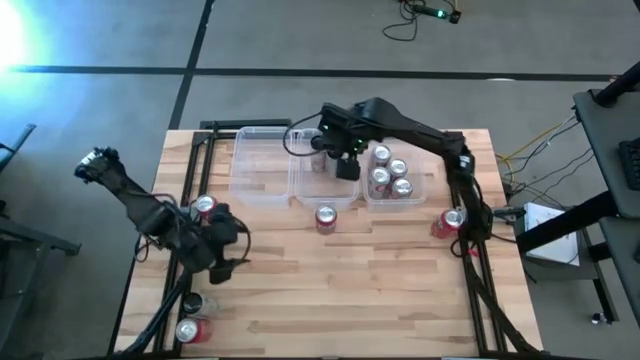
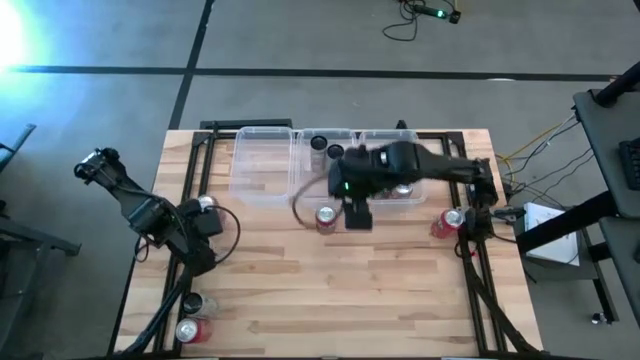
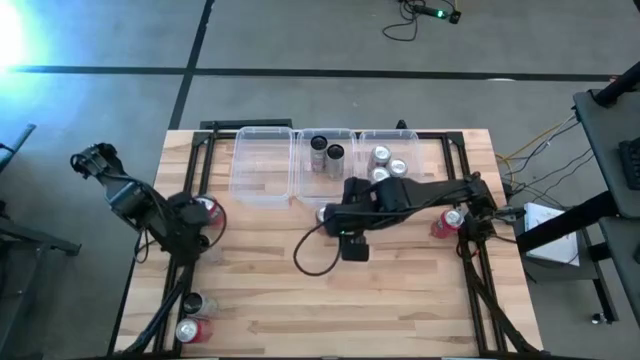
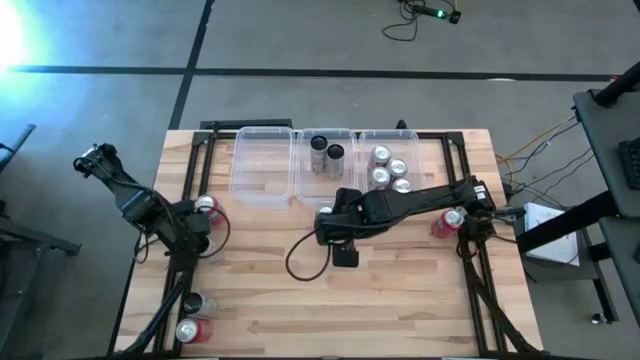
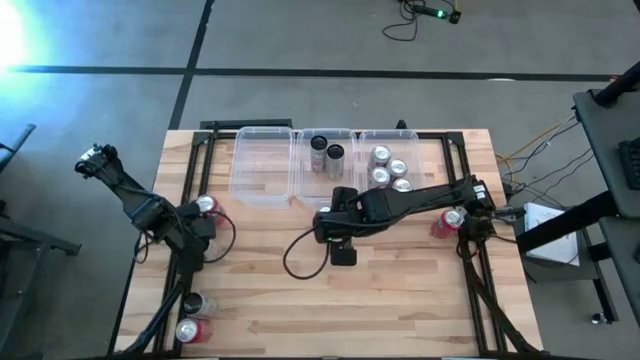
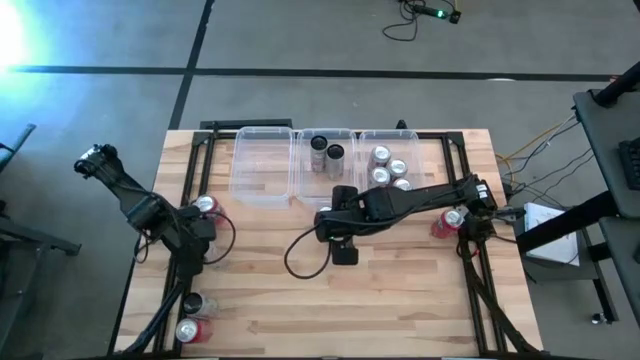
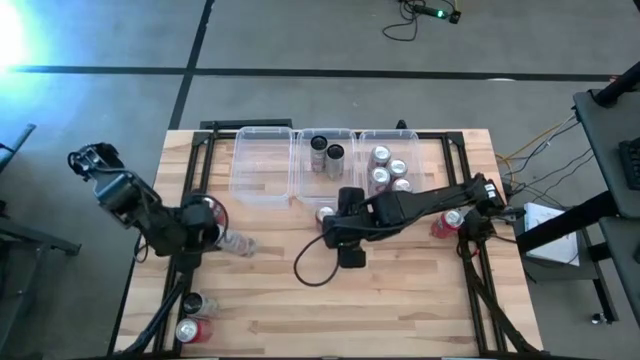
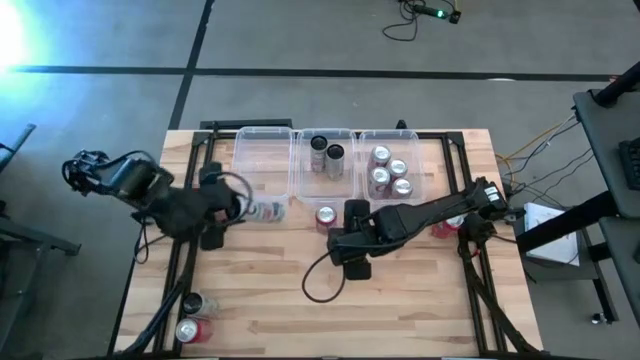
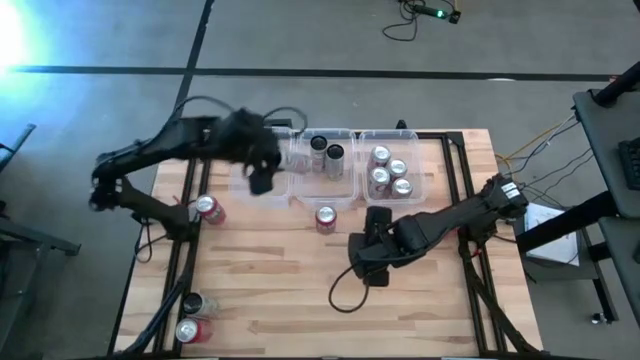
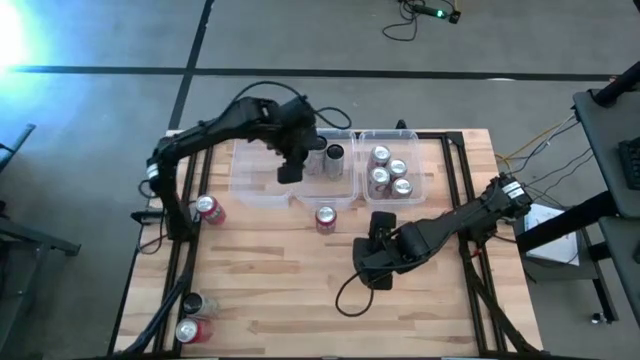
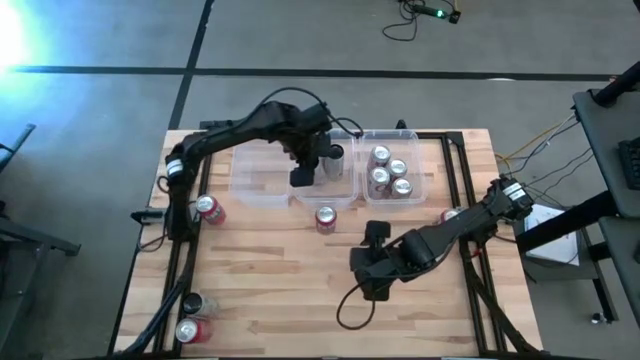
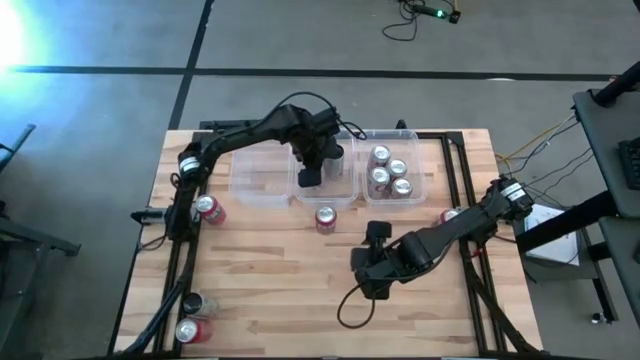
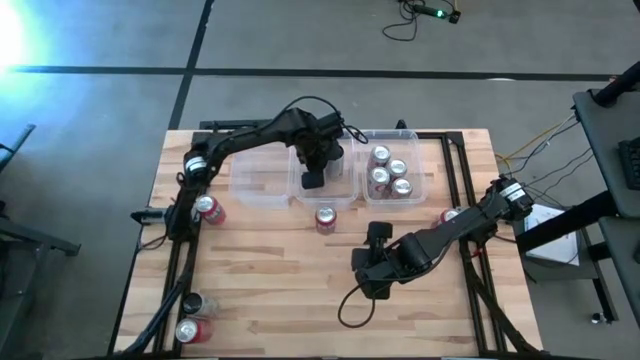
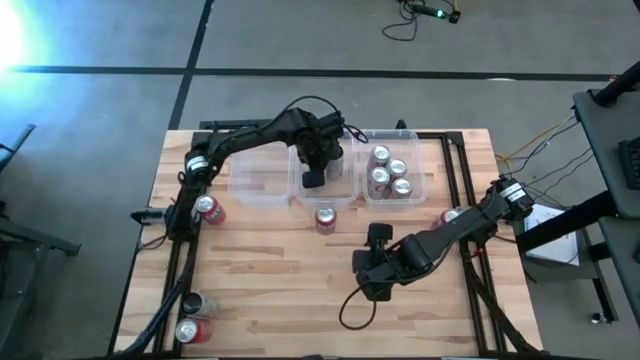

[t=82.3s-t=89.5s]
Task: Sort soda cans
Put the top white pink soda can into the middle transparent bin

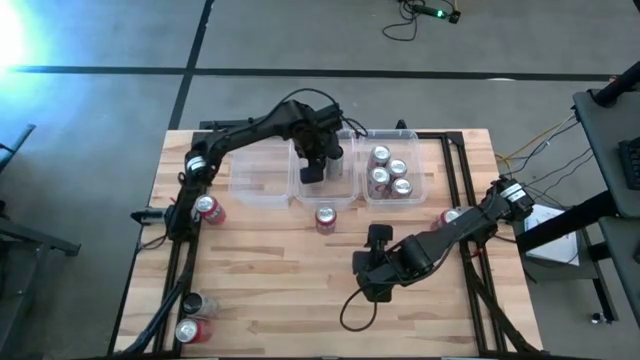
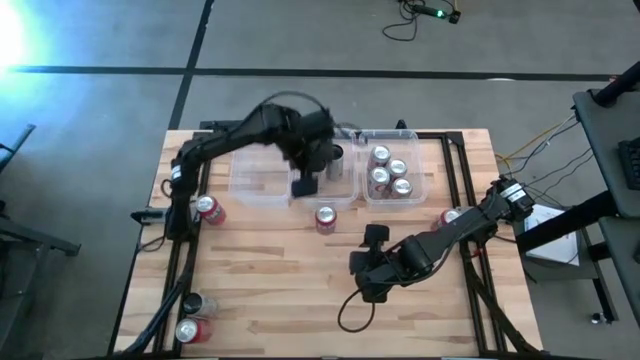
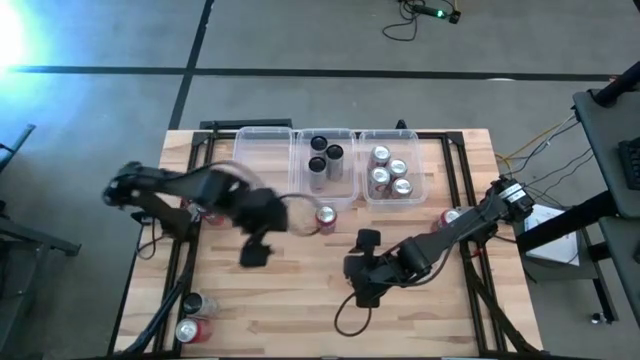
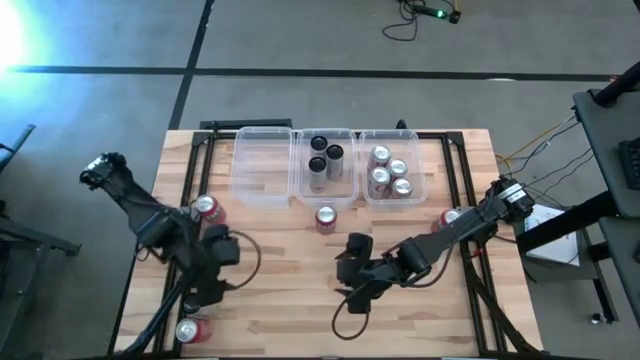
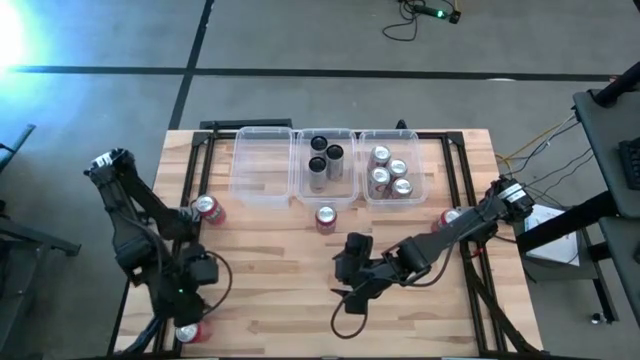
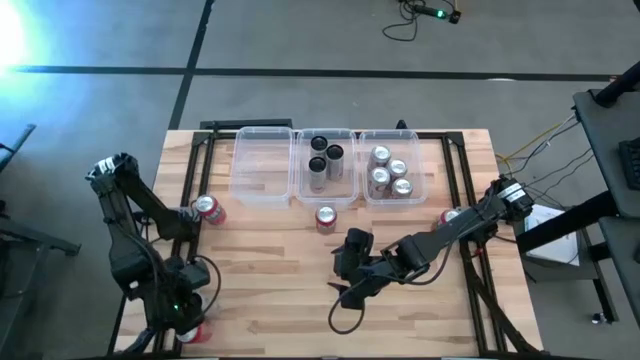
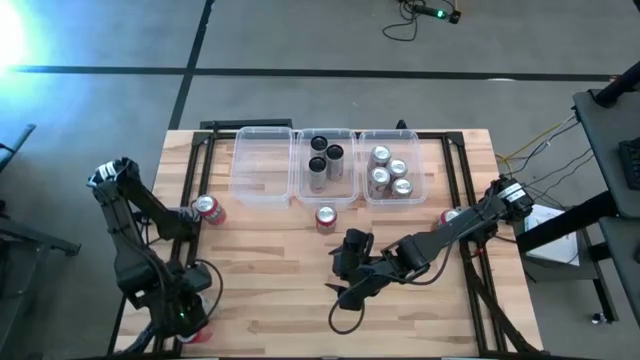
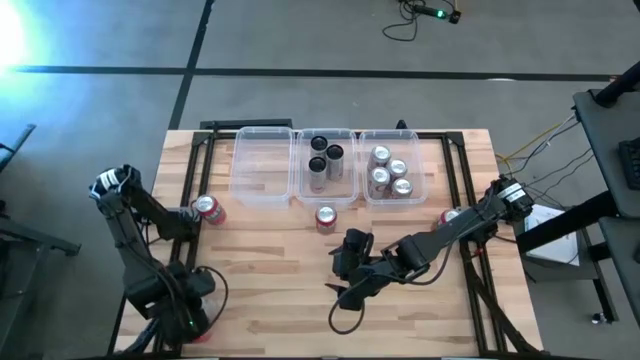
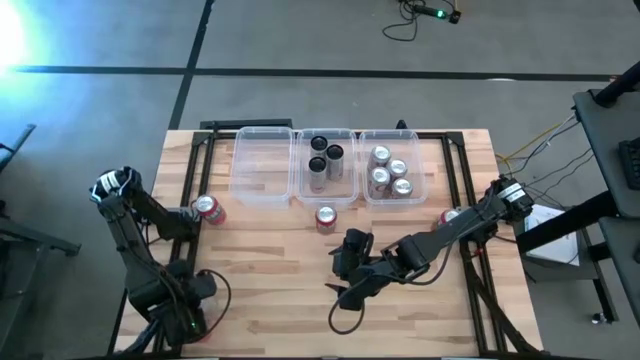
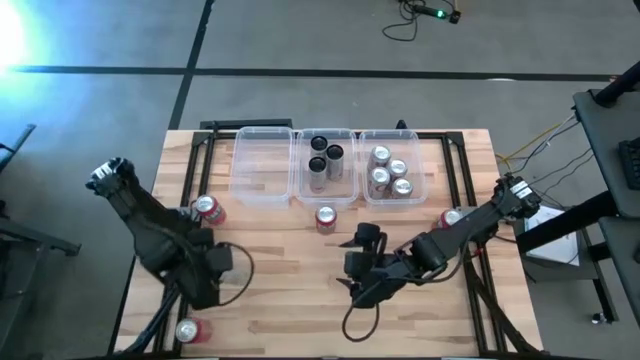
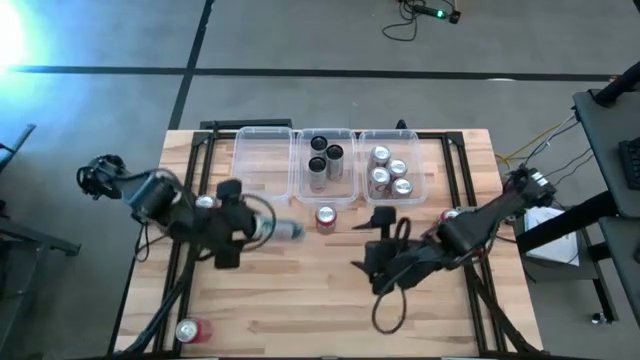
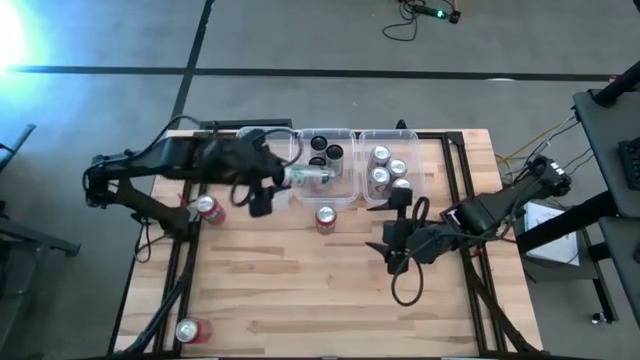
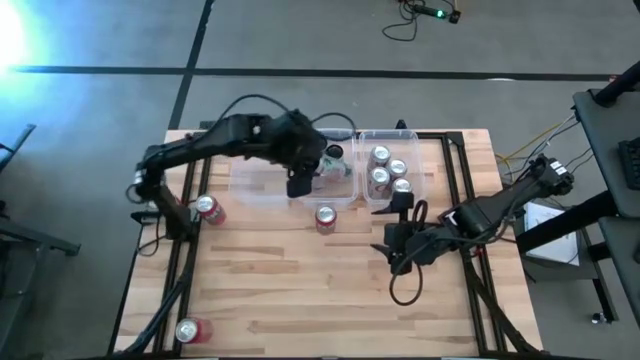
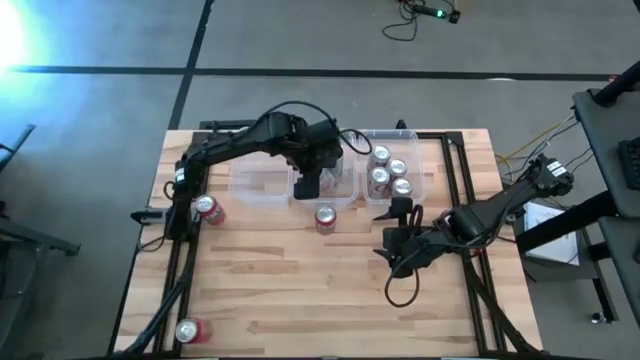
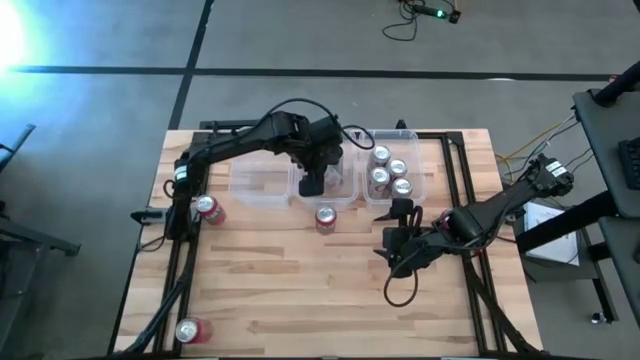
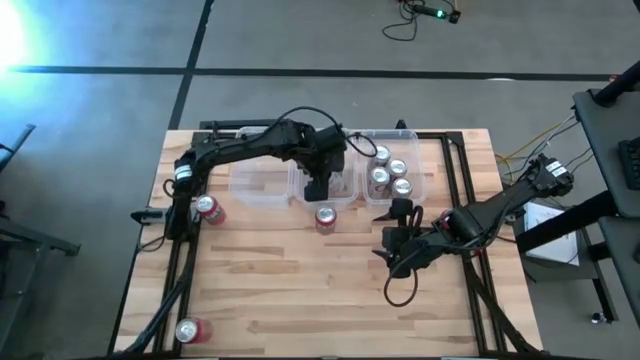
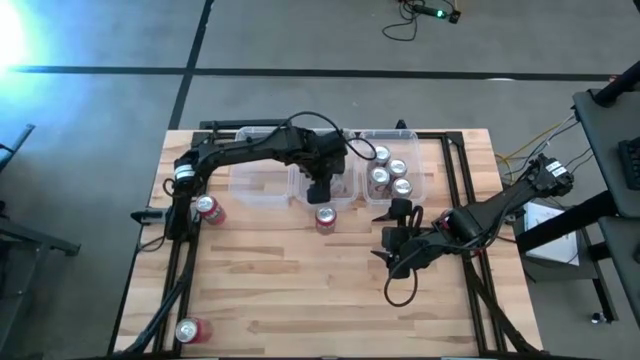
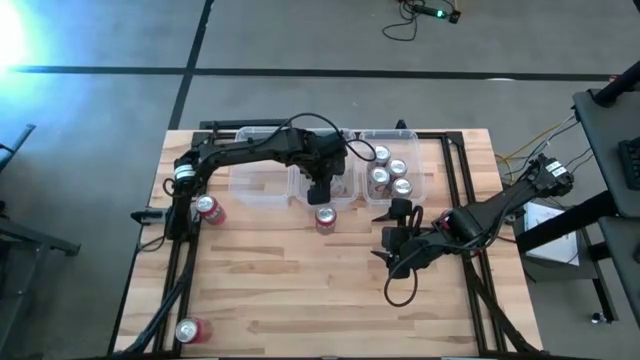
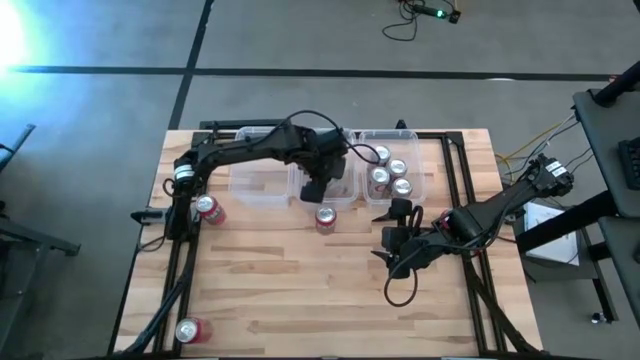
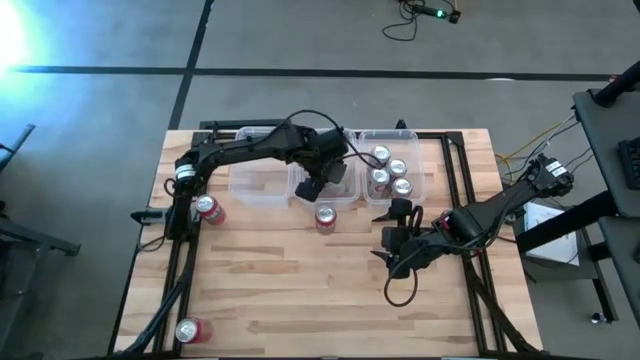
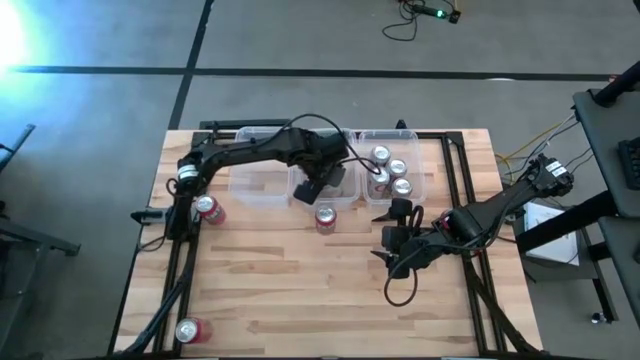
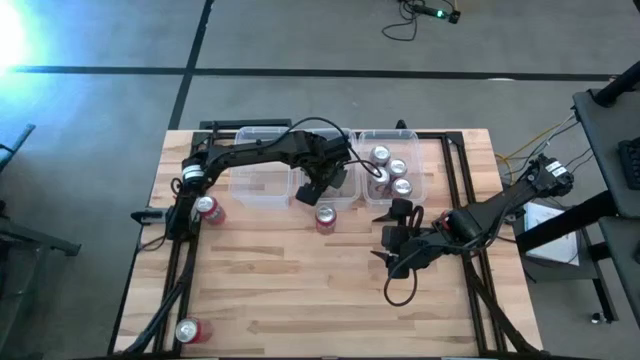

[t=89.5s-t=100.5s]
Put the white pink soda can into the middle transparent bin

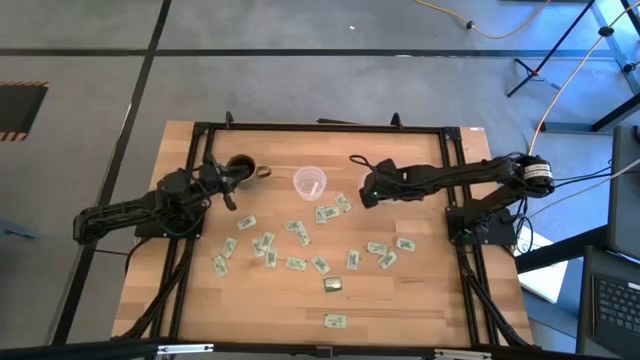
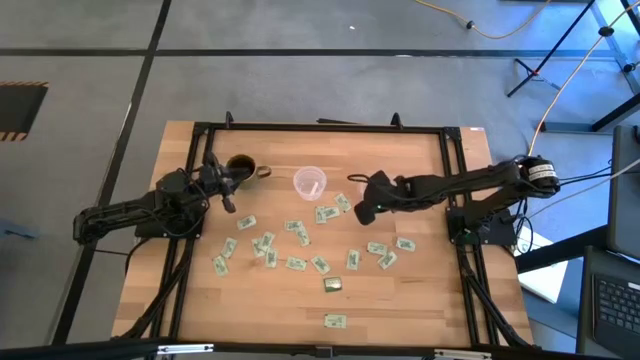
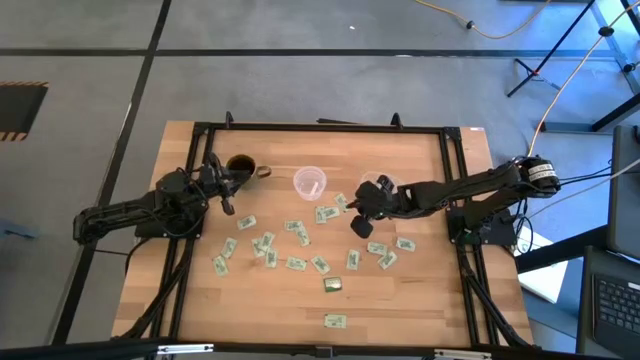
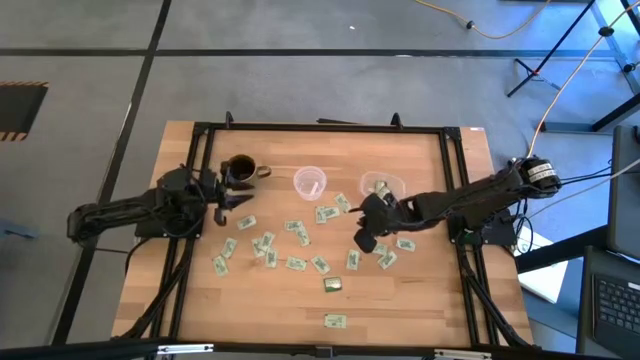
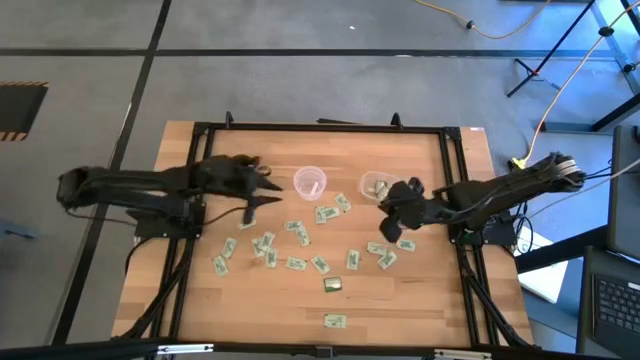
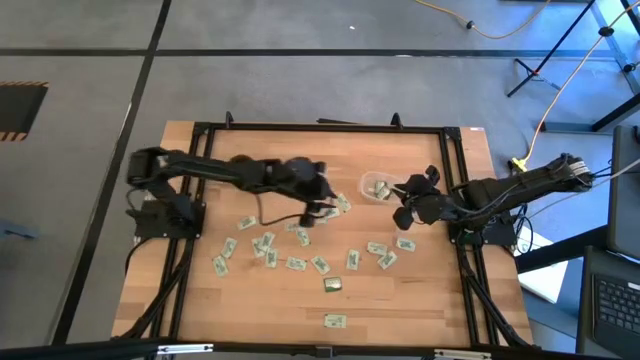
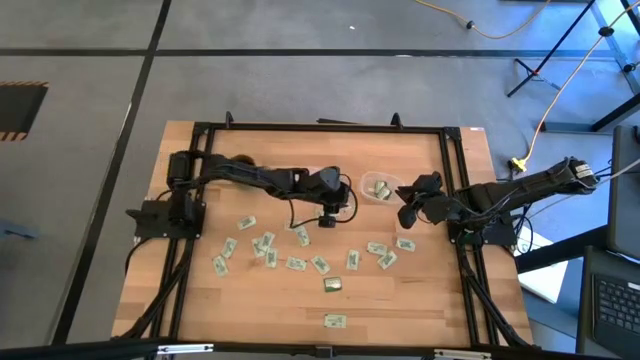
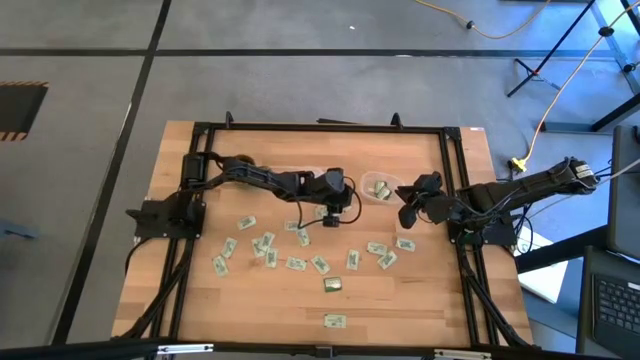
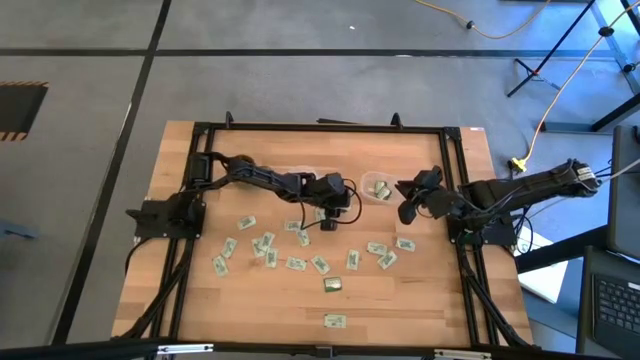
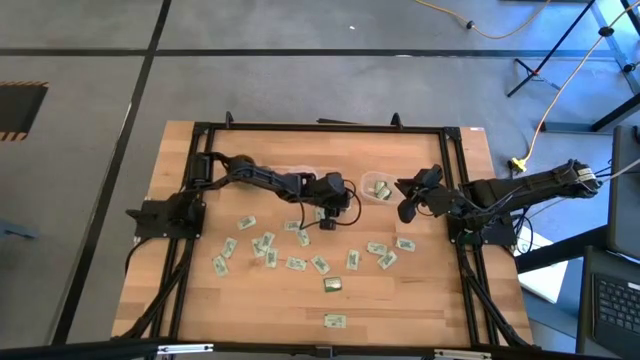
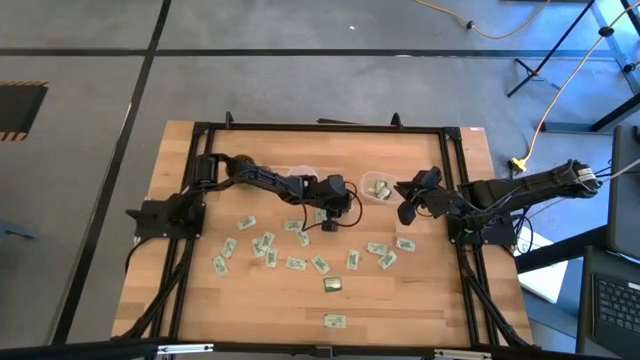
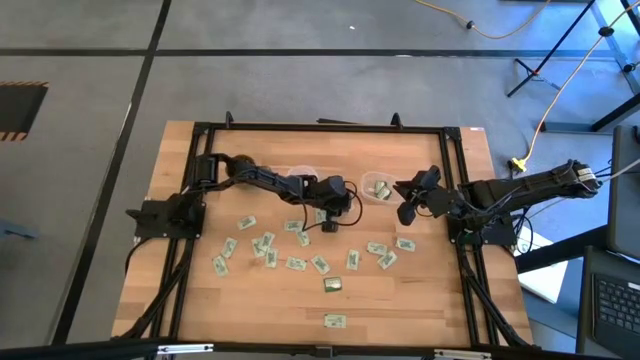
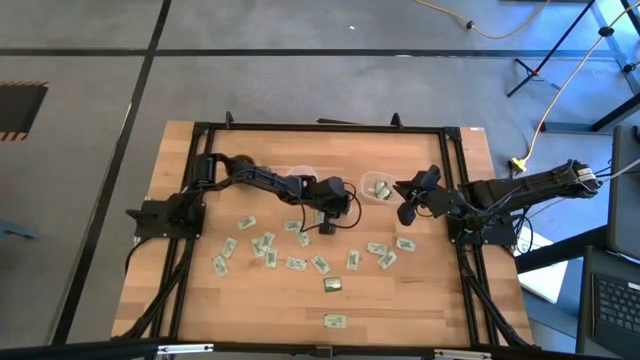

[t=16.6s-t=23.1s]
Task: Pick and place items into bin
Put the white stevia packet into the left transparent bin
